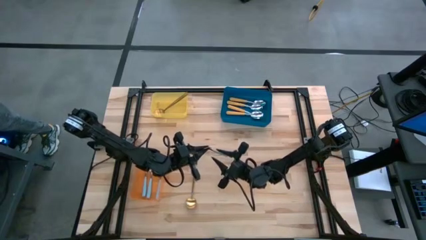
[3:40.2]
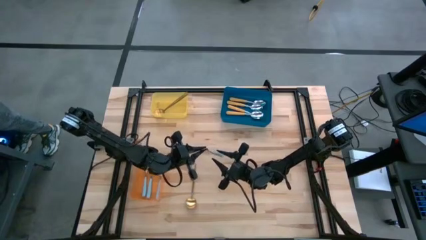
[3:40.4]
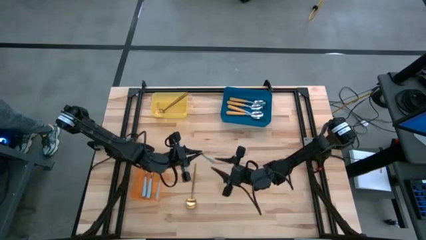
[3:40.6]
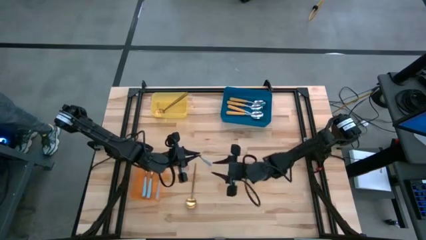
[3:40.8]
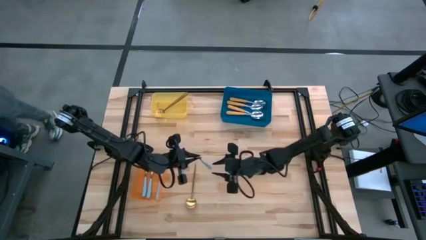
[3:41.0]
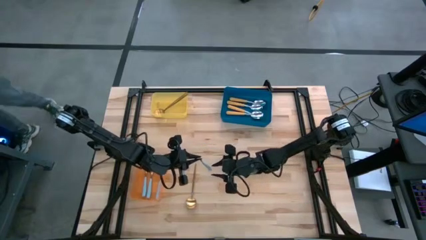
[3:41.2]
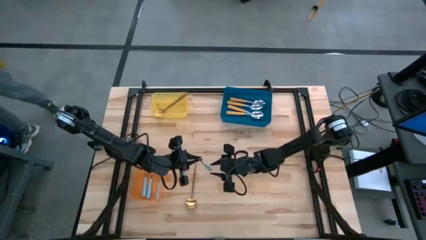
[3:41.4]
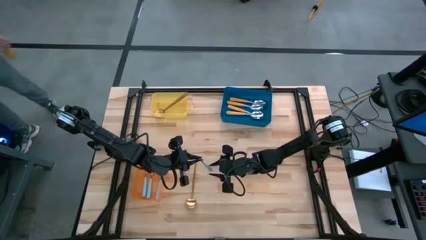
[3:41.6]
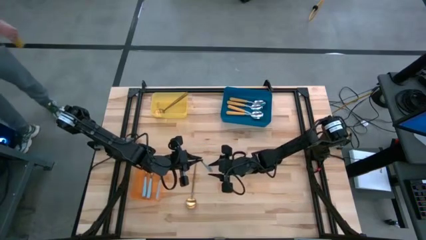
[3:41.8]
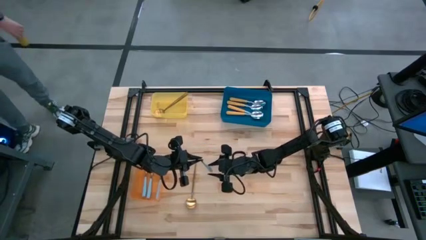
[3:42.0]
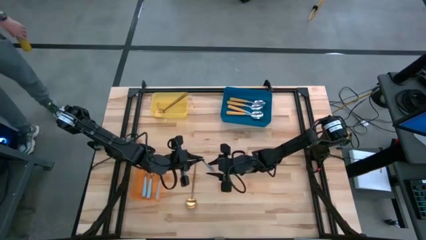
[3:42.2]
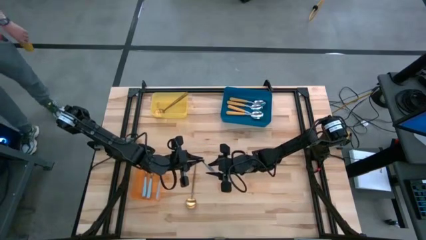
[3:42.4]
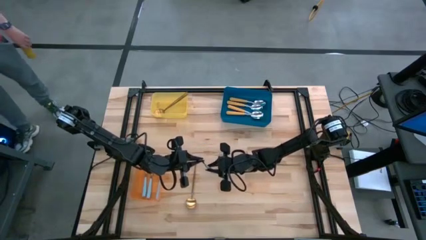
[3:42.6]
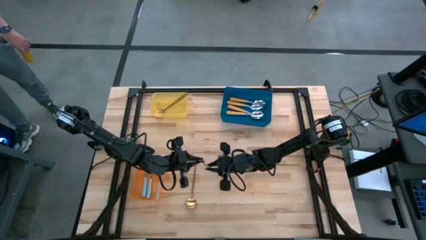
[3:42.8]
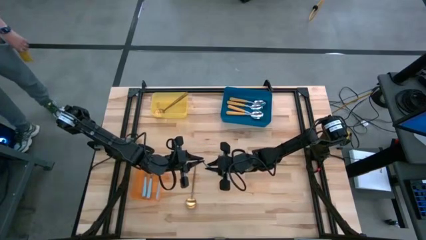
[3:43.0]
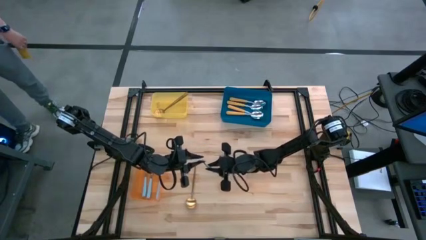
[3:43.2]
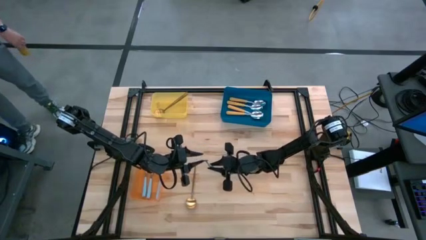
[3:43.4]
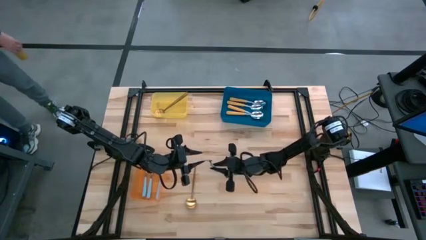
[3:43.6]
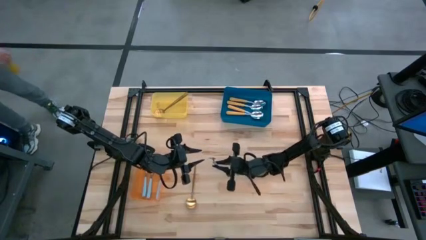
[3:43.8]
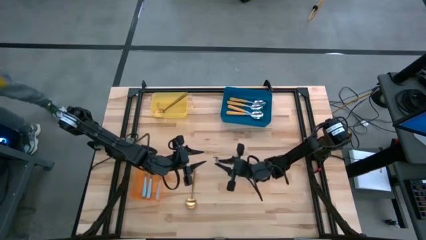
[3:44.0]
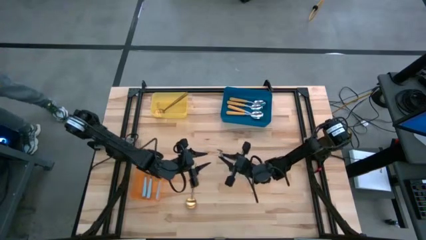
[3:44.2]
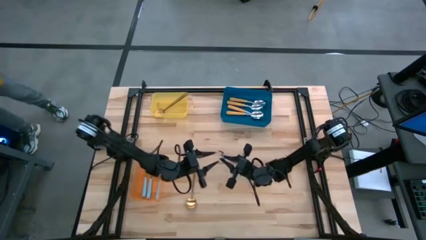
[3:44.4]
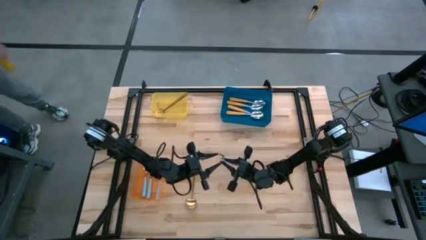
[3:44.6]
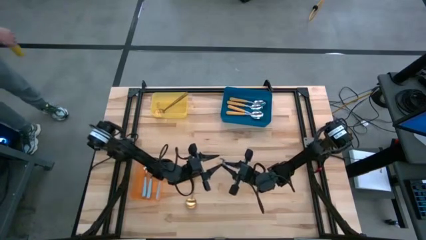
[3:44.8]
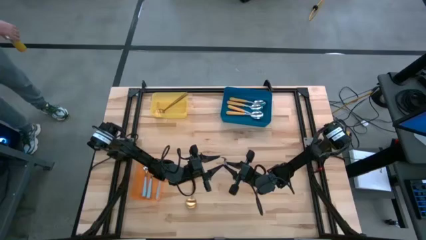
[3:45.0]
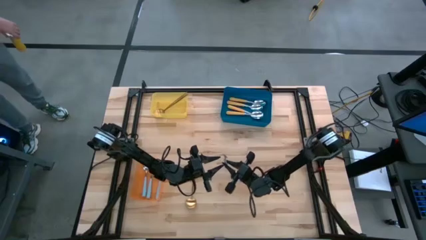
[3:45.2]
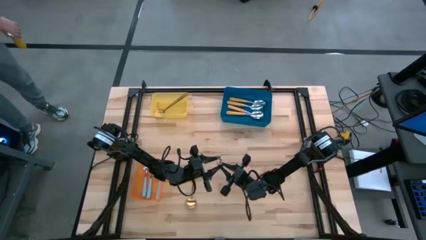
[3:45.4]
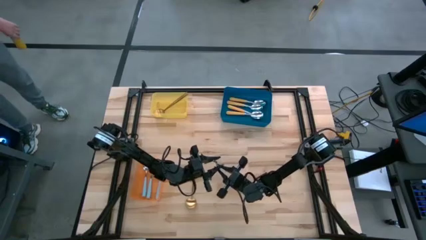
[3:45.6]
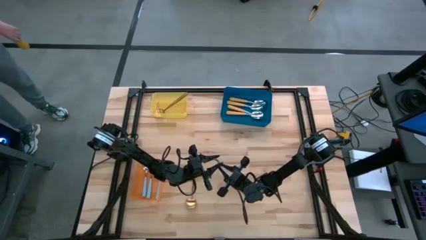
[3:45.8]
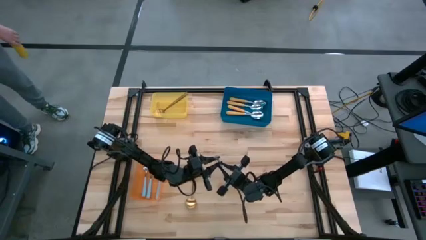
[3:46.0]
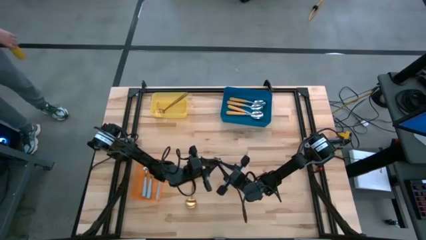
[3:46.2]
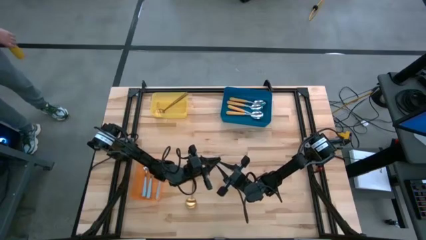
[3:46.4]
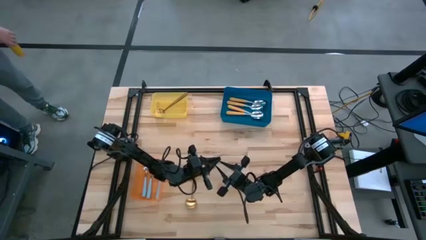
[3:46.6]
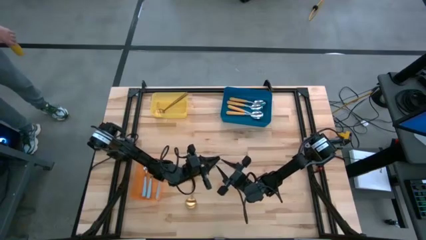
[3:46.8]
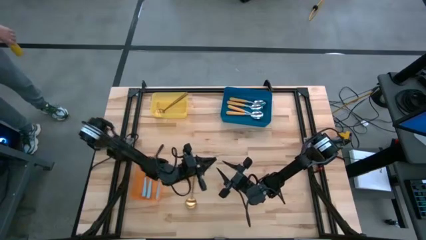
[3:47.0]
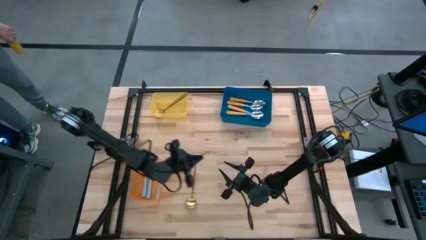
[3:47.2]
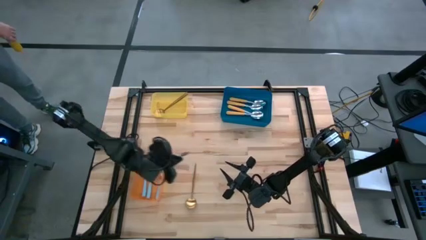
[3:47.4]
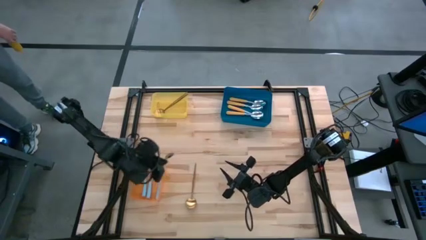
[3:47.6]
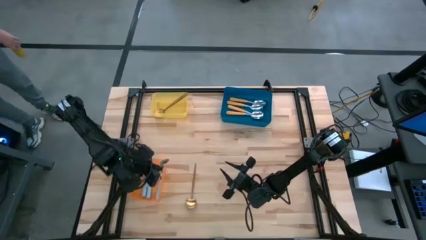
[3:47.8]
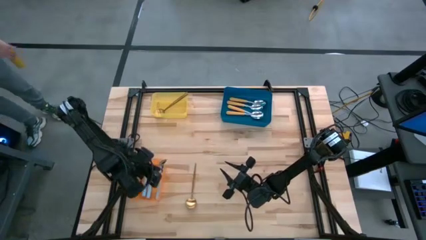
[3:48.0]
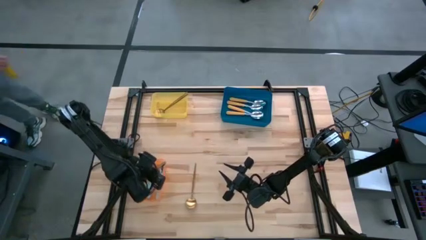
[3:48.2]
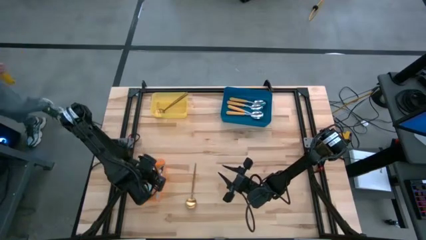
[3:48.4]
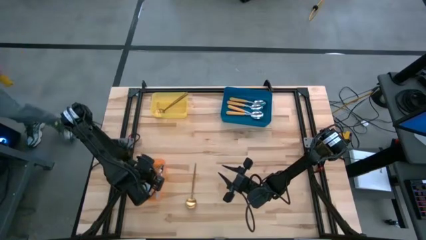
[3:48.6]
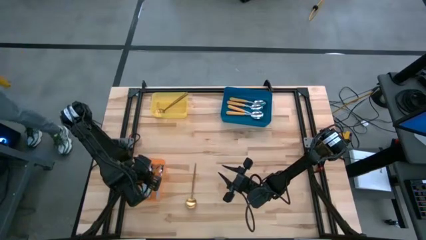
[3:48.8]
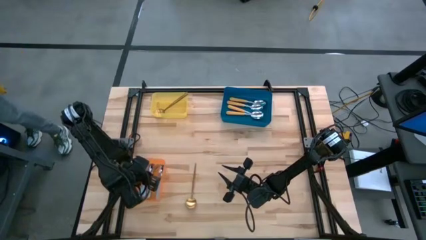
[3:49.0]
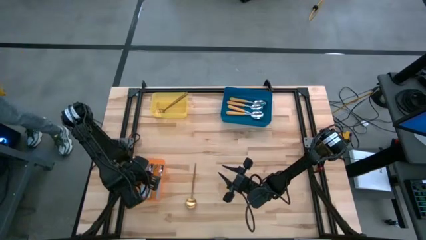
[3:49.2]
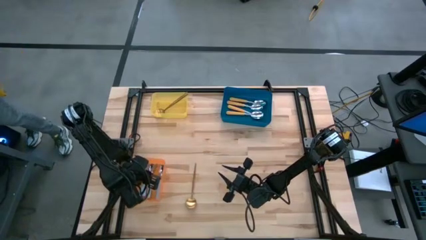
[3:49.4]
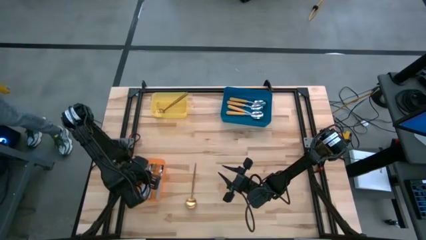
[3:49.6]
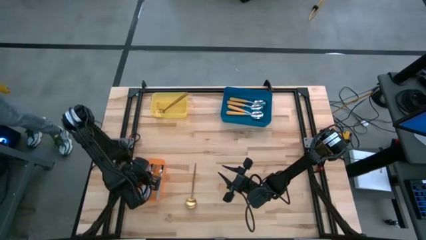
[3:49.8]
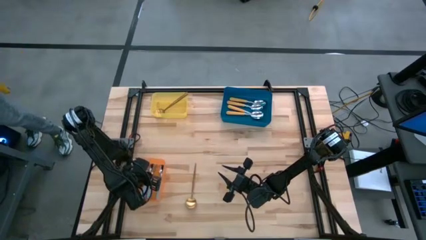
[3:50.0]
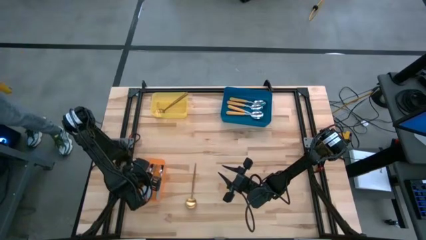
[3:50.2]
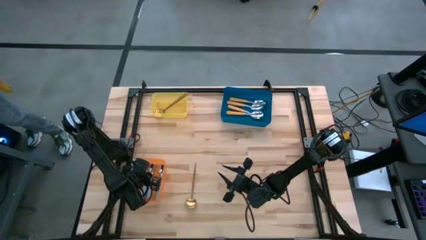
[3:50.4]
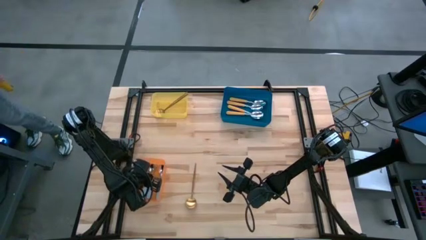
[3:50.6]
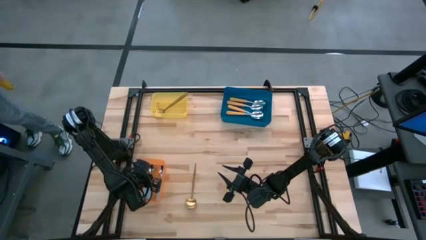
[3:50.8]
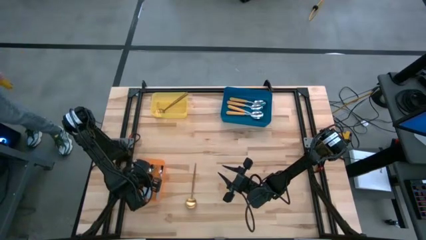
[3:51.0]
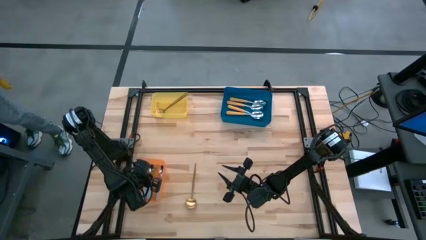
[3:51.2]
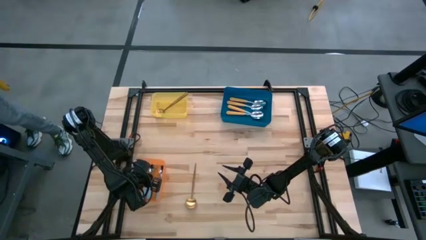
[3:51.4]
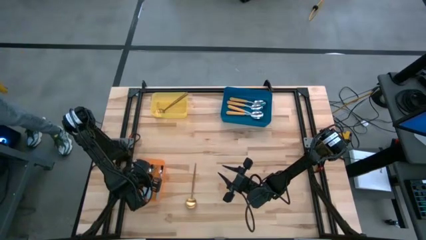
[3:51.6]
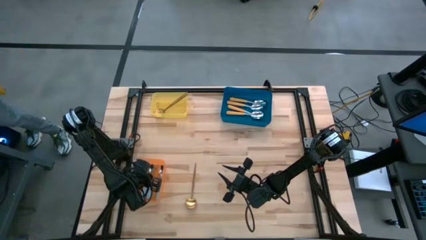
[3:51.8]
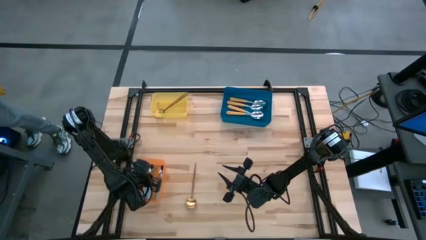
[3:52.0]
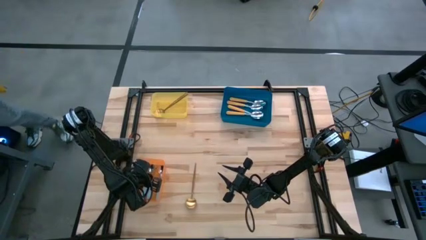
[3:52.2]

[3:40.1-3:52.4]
Task: Sort silverware by color (type)
Put the blue spoon into the orange bin

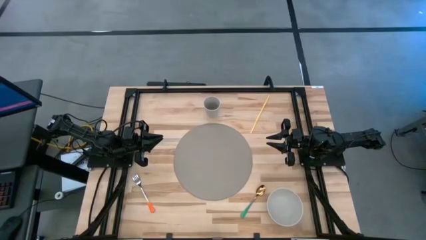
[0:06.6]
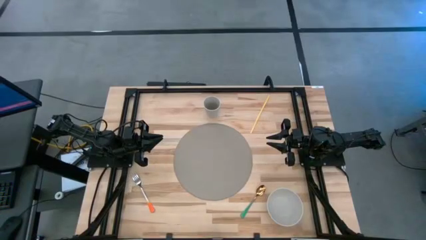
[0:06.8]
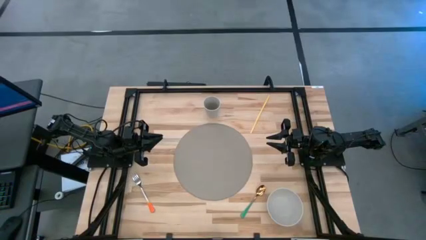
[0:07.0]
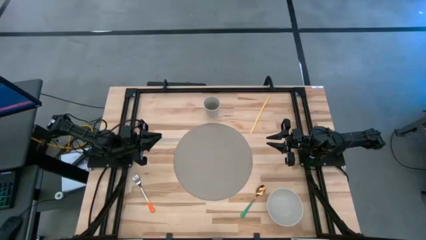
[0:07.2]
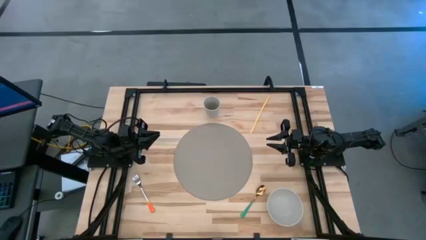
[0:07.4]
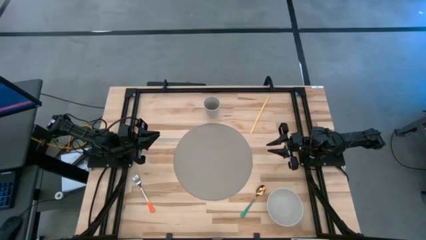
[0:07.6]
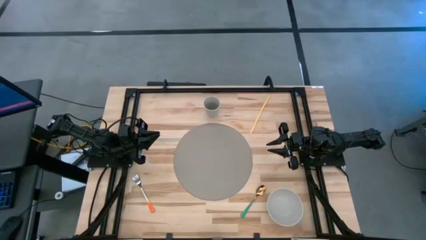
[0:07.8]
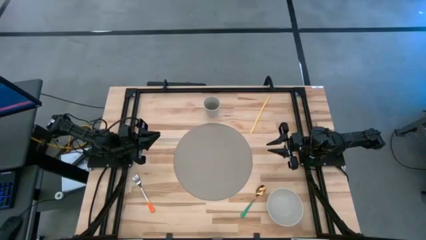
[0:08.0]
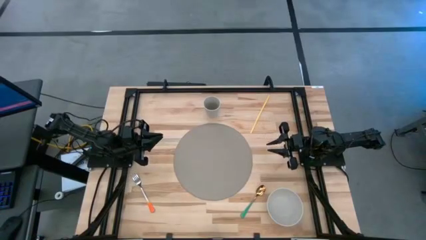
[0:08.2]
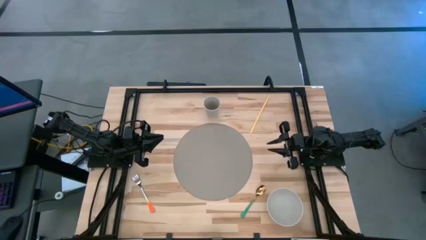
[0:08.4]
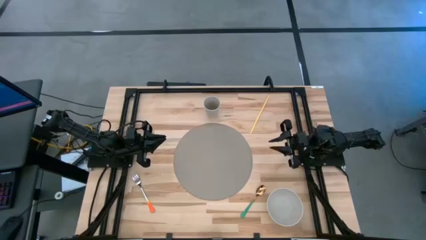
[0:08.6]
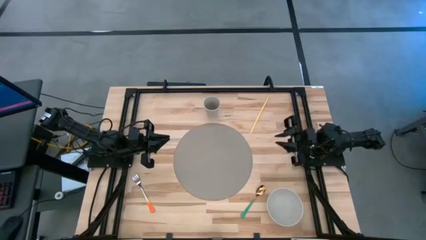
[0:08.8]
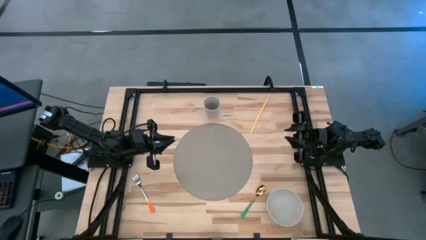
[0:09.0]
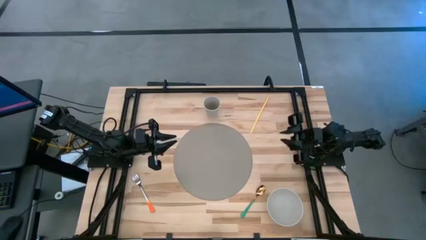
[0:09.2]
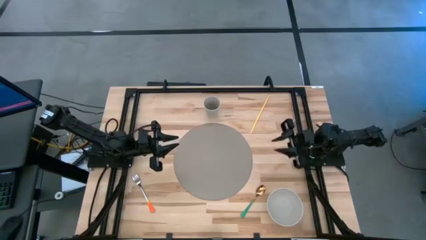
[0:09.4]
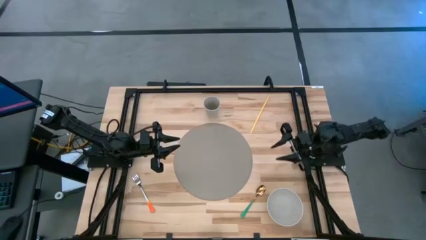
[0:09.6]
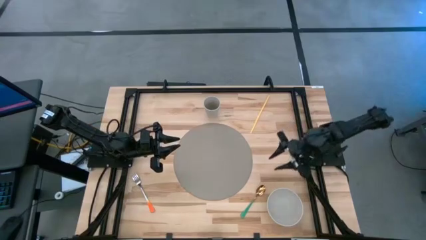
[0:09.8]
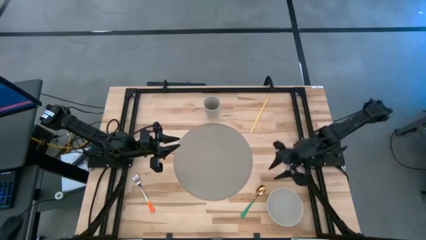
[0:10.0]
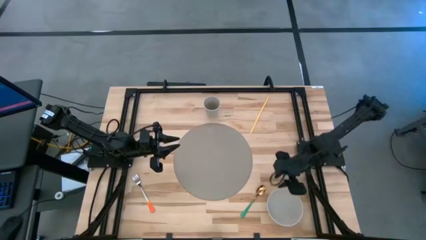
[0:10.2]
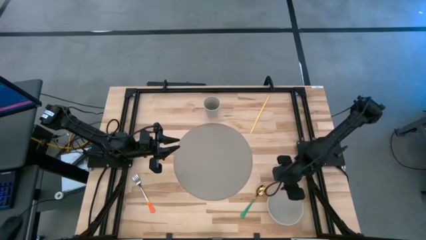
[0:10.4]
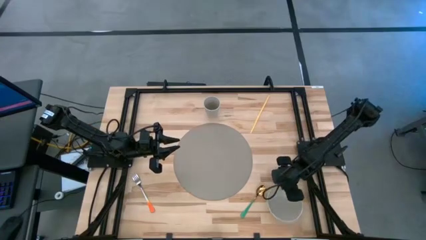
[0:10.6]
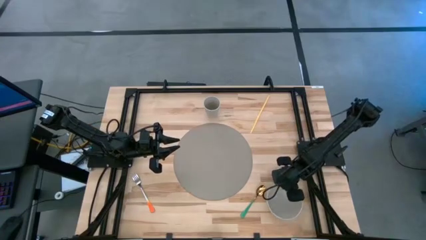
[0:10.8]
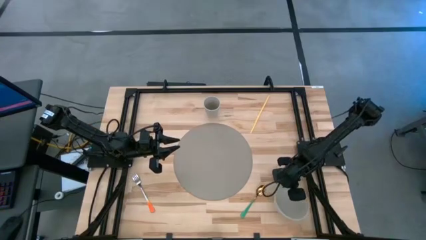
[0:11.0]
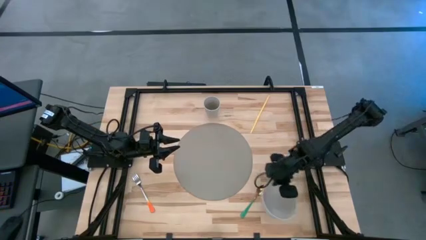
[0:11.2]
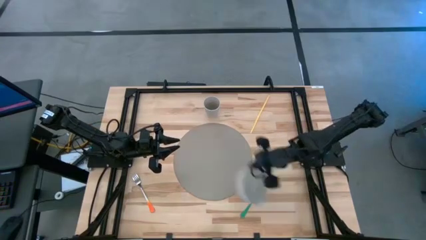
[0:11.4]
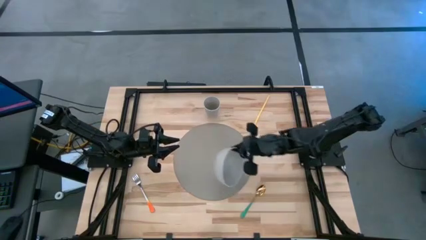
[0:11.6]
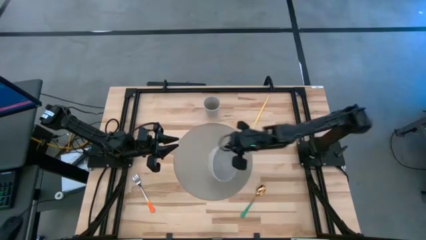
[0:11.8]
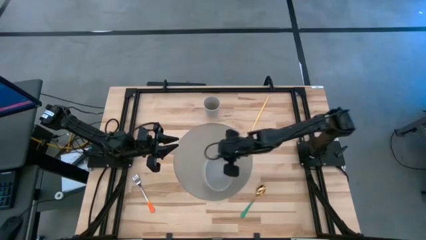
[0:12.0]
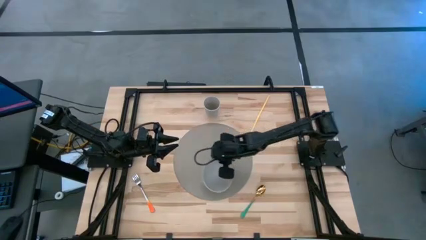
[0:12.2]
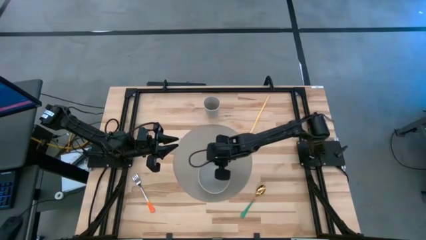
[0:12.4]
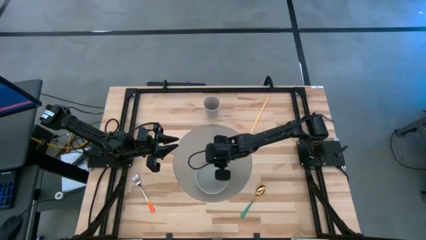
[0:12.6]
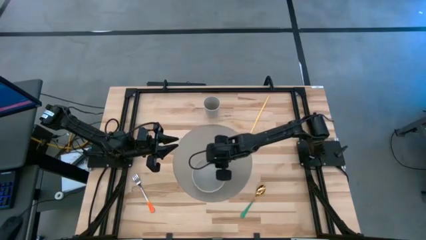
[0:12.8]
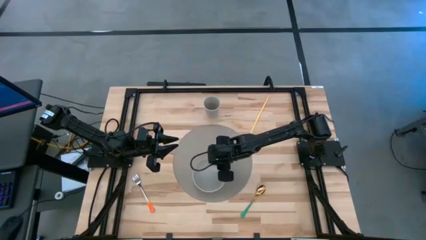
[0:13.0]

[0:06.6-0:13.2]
Task: Pick & Place Utensil
Put the white bowl on the gray placemat
